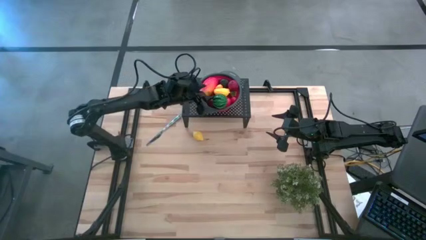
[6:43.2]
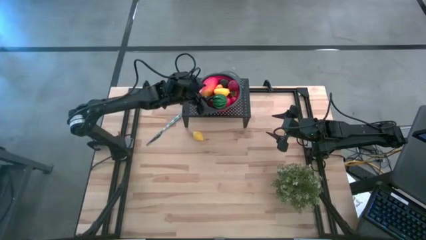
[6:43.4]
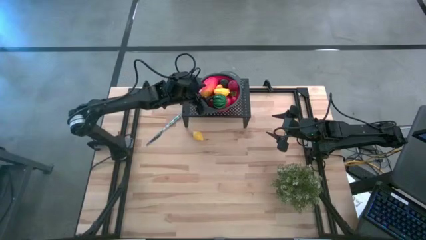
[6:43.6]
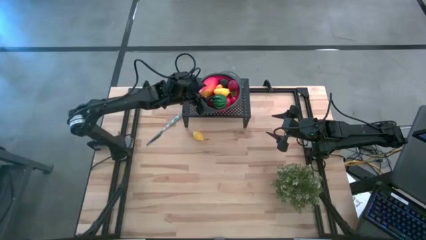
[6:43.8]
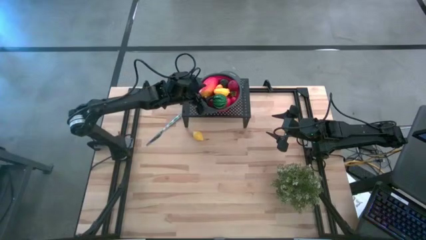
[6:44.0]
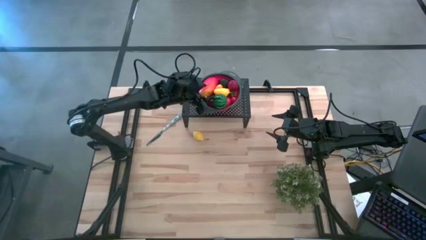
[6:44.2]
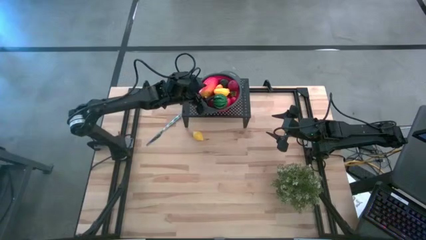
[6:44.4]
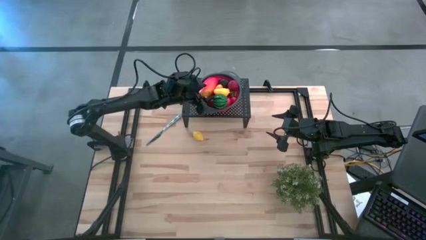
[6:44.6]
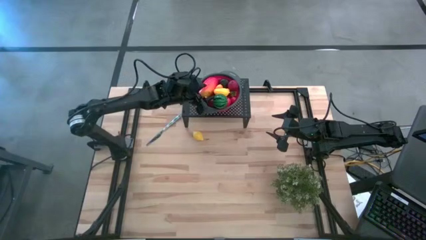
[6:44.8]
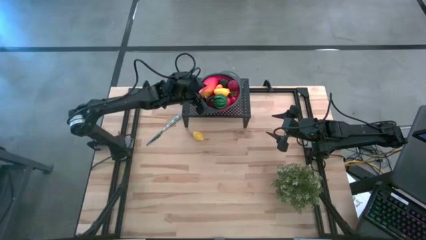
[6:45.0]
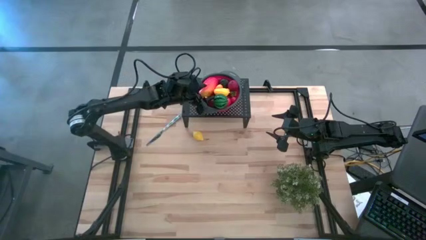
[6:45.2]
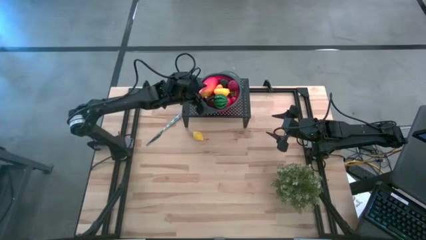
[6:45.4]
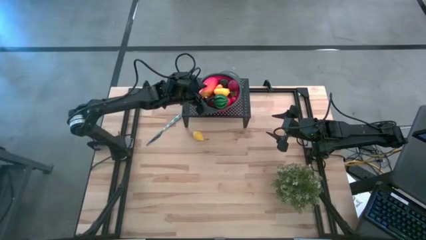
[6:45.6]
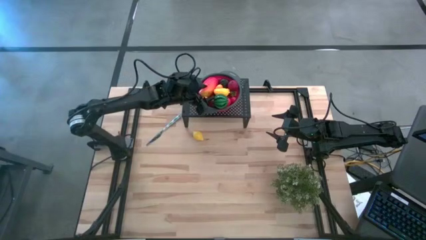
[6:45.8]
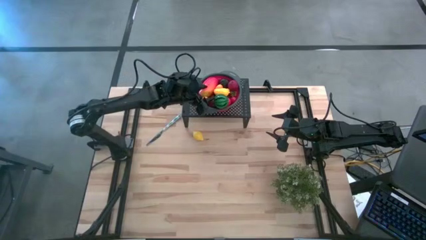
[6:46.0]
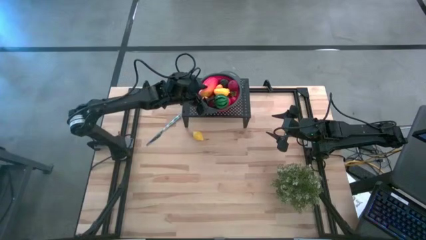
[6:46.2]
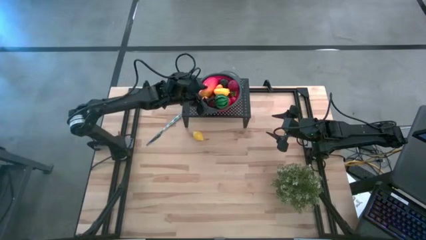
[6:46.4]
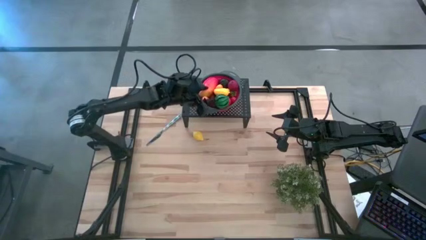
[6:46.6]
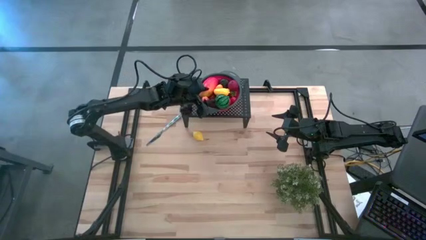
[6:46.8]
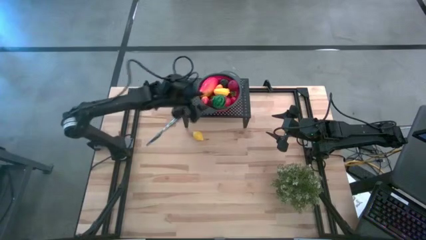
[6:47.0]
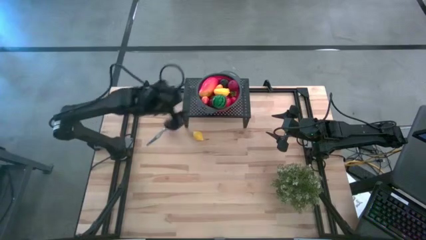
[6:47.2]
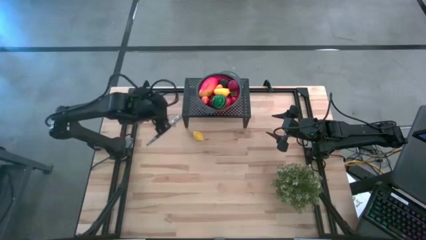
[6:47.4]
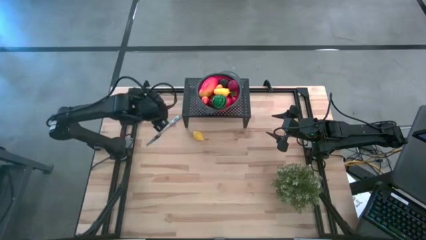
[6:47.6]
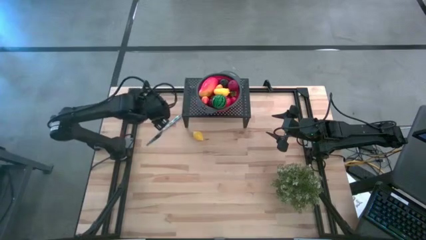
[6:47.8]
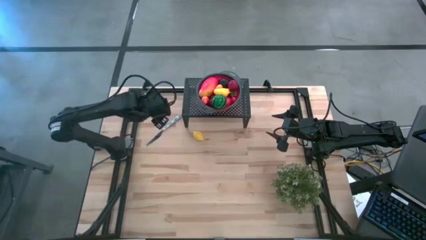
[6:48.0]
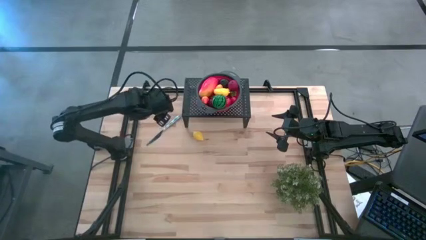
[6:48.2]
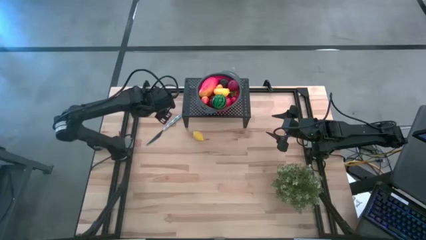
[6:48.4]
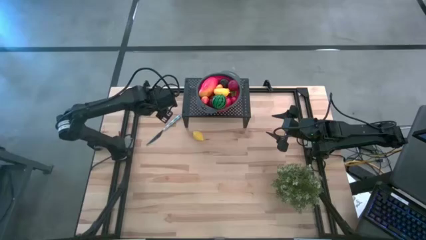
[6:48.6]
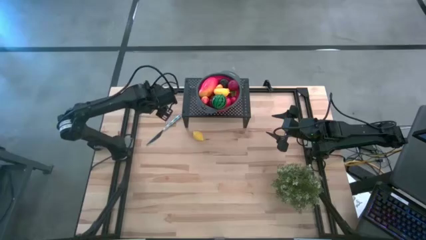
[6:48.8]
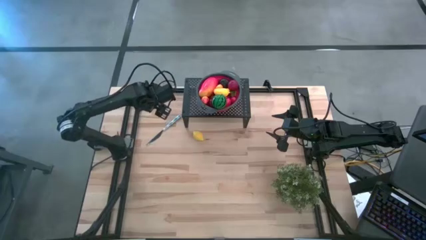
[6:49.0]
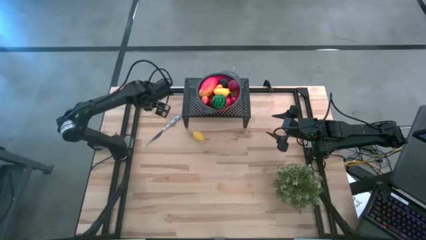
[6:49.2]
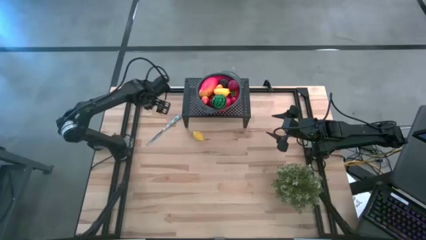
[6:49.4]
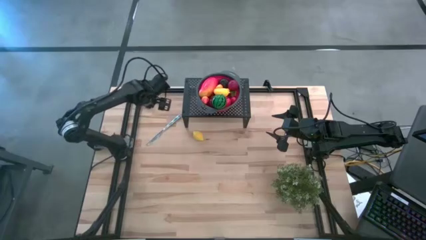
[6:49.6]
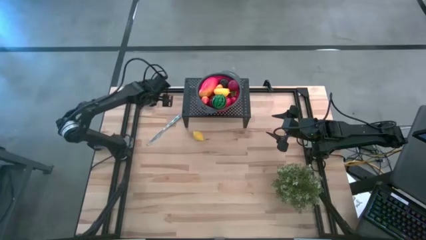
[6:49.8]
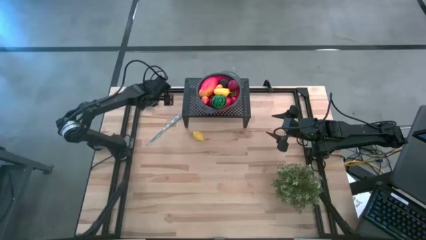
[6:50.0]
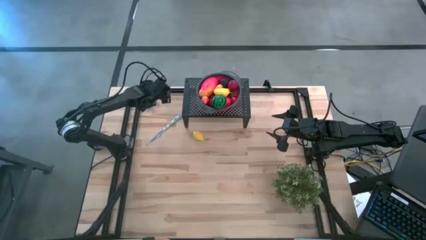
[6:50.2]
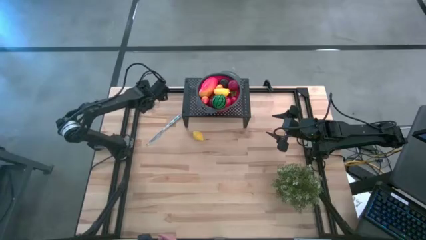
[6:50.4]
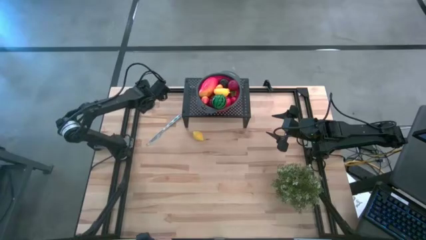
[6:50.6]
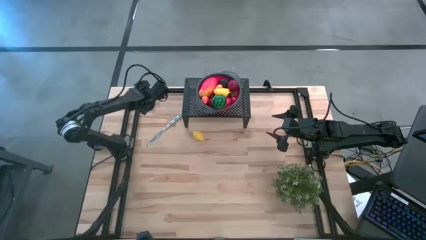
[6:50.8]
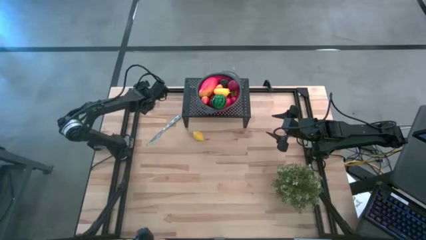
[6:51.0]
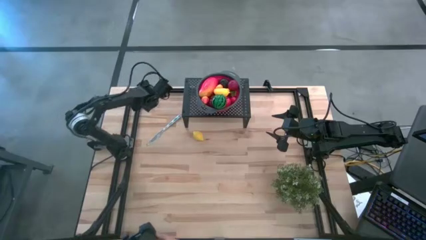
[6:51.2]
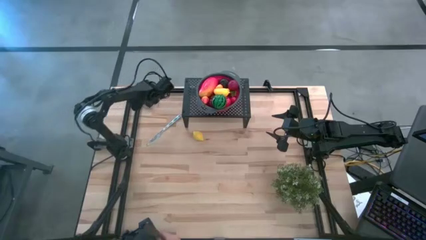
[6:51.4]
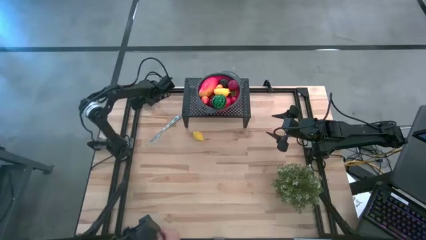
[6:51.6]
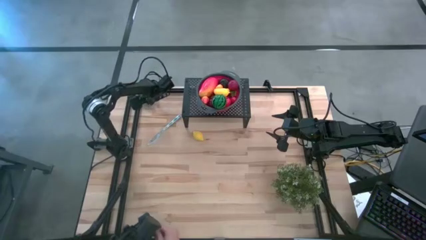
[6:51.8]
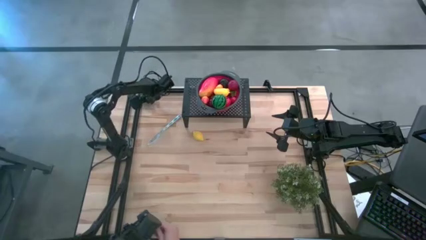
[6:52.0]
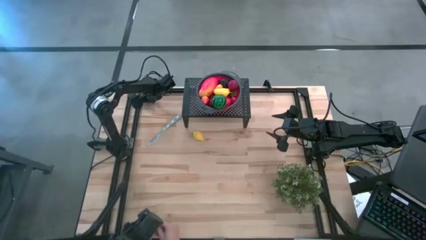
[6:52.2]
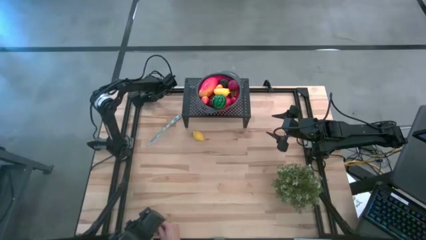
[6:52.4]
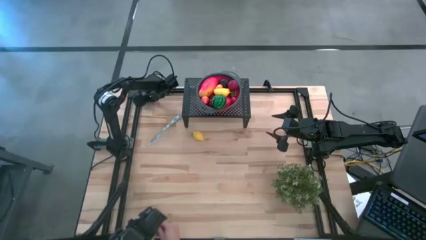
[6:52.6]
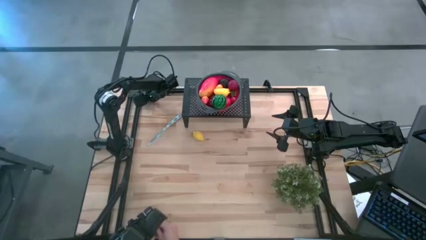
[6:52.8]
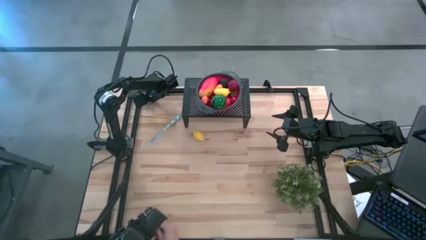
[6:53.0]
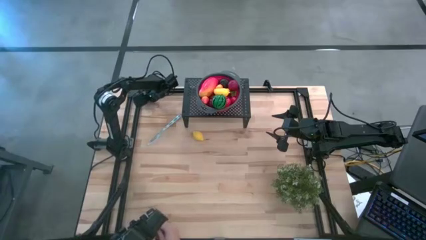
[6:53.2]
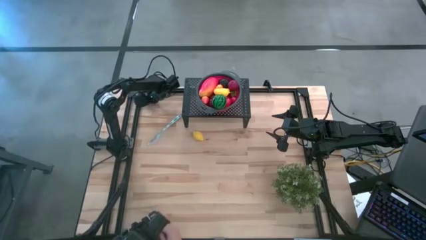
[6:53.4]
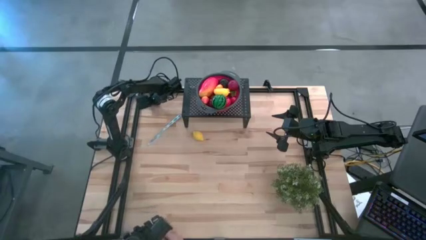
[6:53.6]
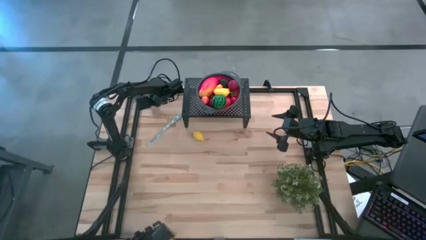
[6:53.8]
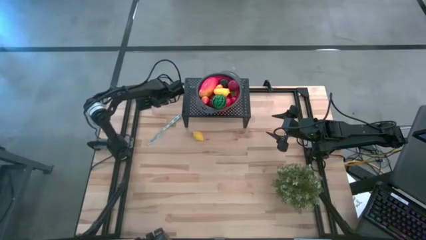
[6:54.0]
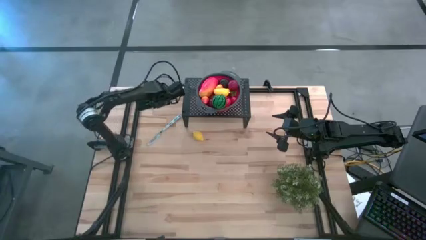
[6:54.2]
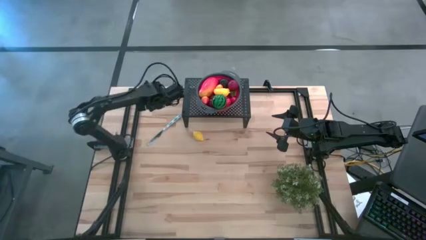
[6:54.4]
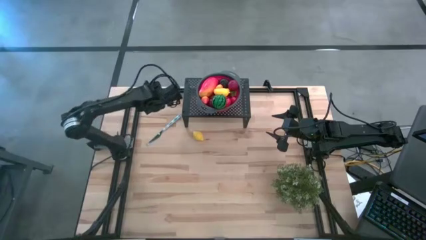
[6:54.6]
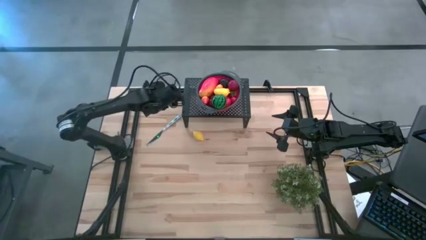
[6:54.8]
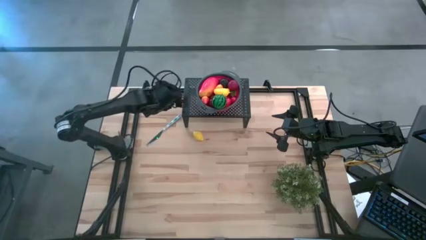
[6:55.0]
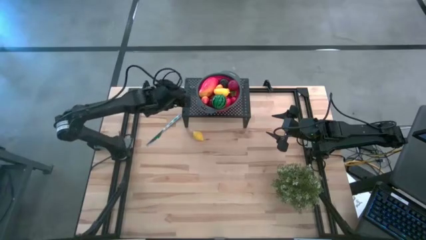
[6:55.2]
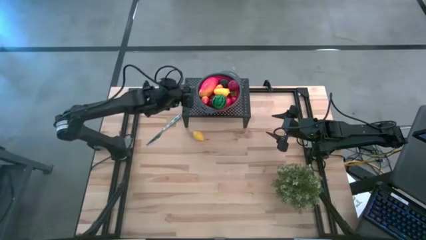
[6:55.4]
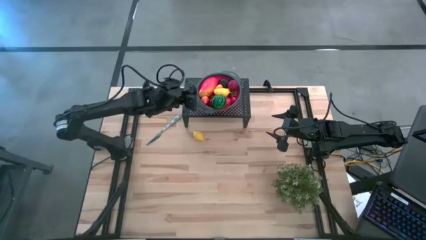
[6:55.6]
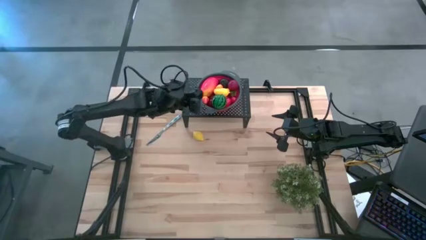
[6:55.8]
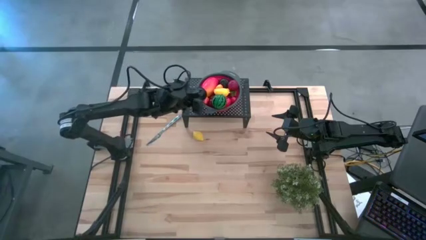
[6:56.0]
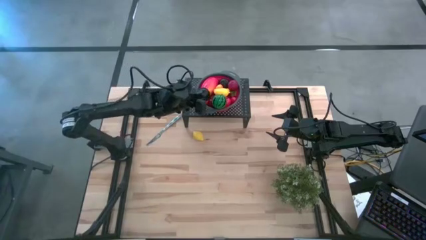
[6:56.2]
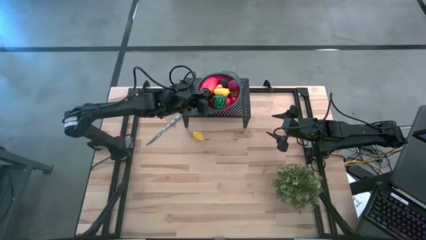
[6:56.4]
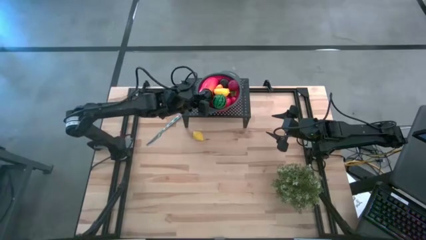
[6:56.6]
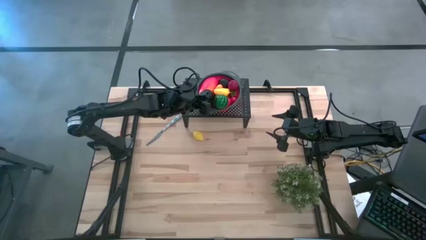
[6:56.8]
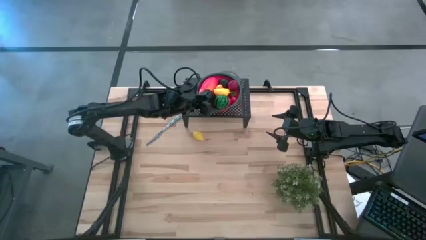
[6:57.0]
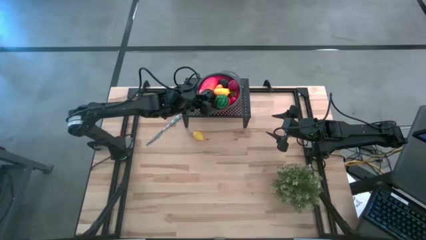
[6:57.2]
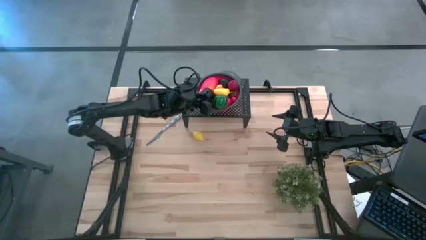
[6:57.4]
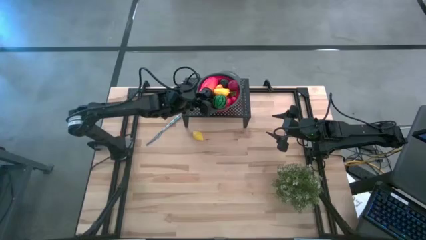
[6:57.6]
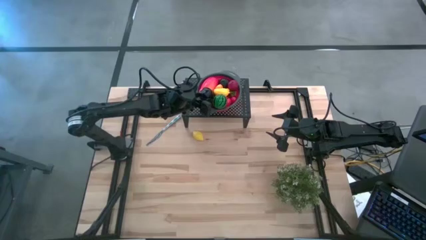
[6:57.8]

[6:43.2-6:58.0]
Task: Pick & Place Fruit
Put the plum in the red colander on the shelf

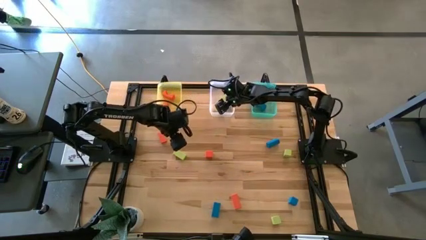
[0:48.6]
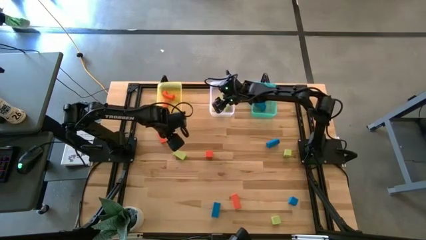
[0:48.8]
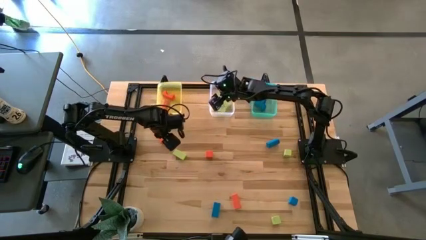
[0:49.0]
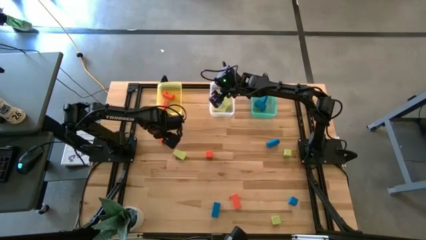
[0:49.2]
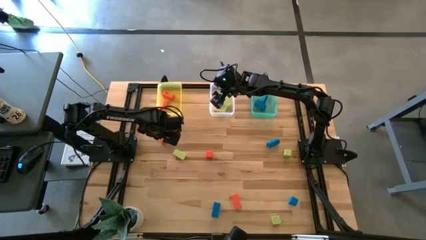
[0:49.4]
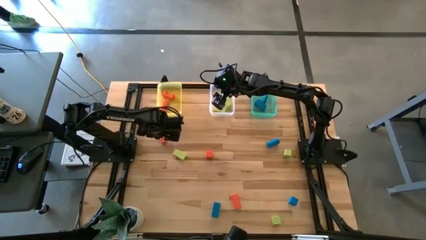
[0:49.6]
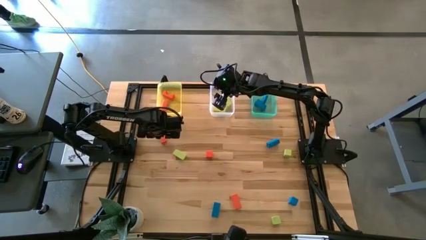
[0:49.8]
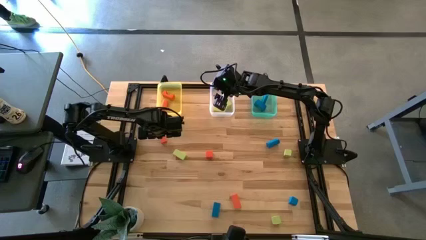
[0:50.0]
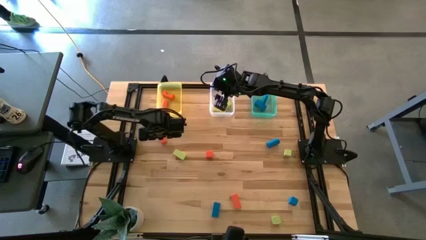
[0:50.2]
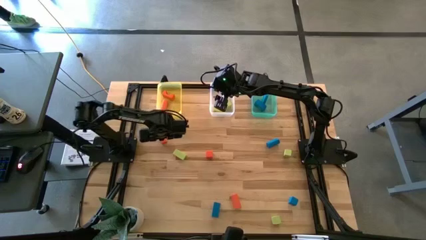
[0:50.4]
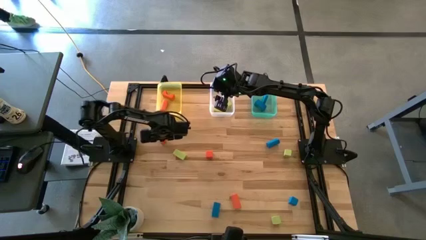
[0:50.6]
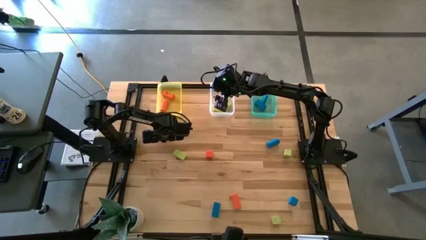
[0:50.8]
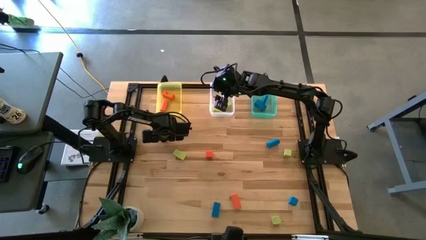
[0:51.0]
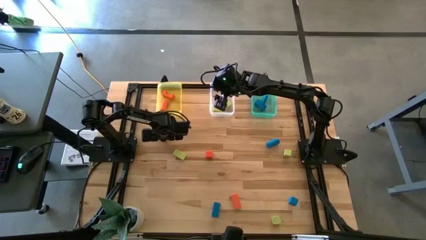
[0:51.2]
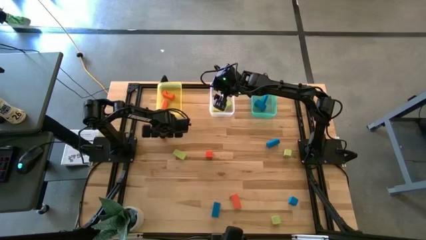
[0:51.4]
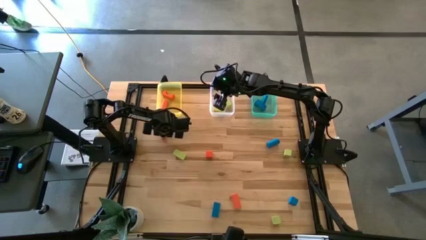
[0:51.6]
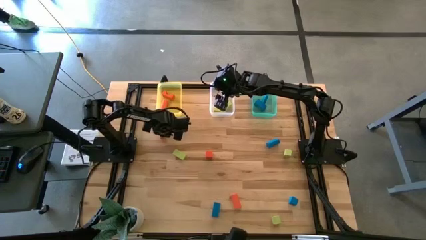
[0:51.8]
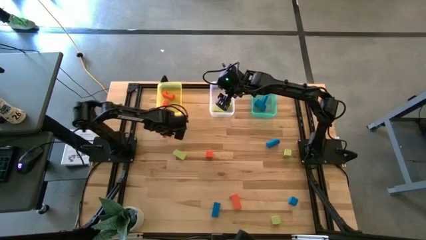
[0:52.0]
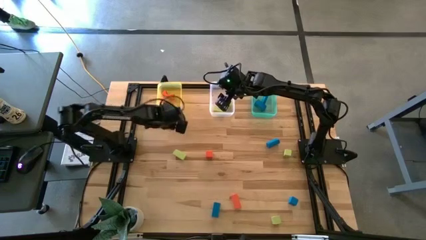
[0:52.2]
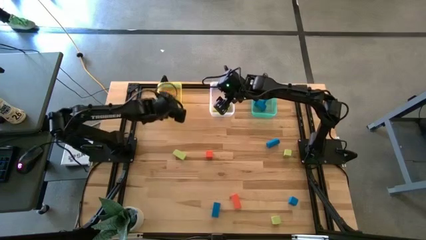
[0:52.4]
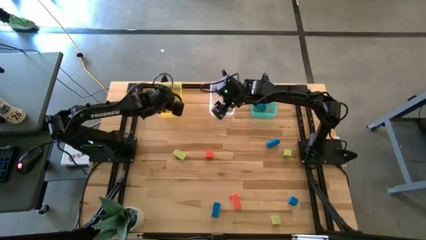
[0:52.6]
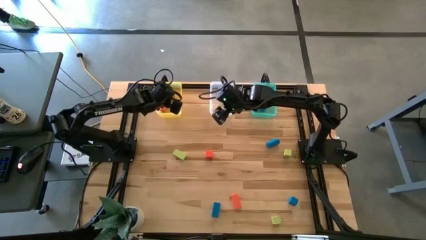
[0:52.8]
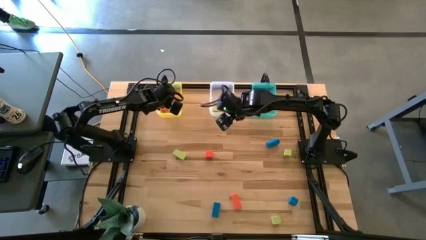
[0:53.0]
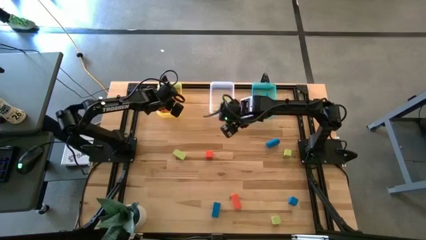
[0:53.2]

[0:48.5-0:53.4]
Task: Sort & place blocks by color
Put the orange block into the yellow bin
